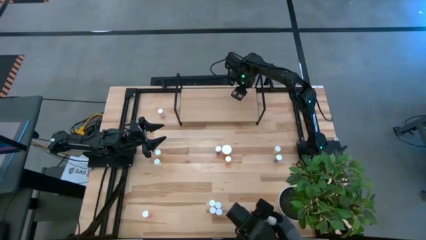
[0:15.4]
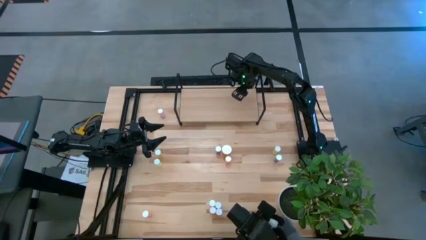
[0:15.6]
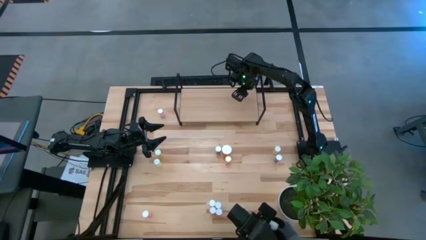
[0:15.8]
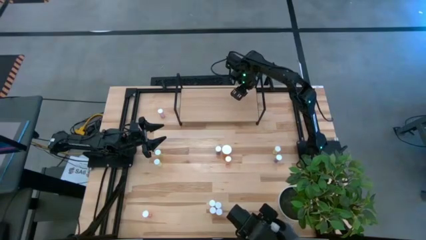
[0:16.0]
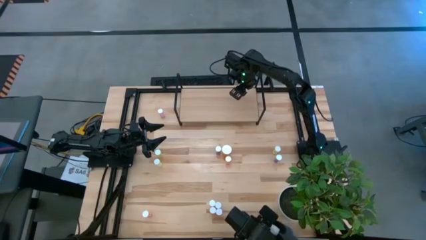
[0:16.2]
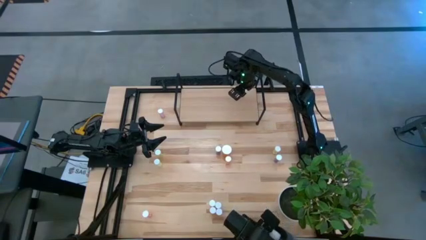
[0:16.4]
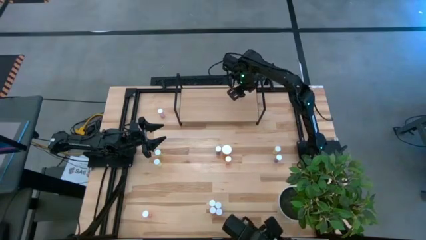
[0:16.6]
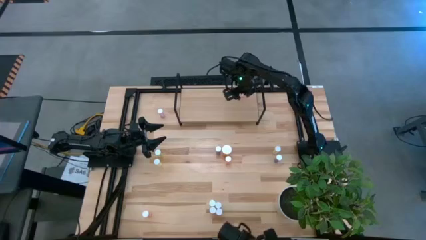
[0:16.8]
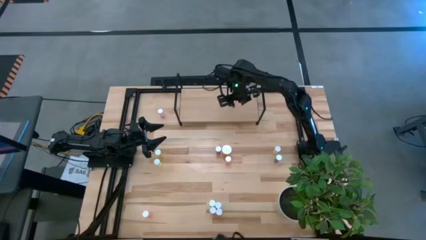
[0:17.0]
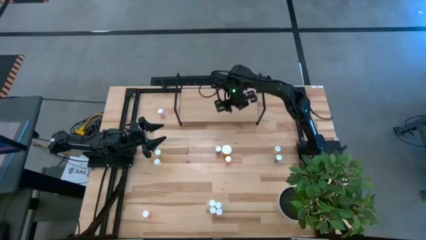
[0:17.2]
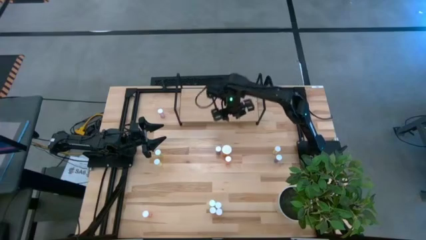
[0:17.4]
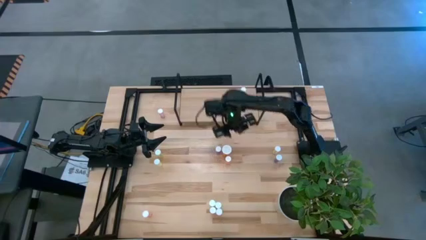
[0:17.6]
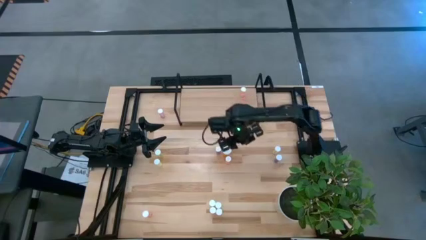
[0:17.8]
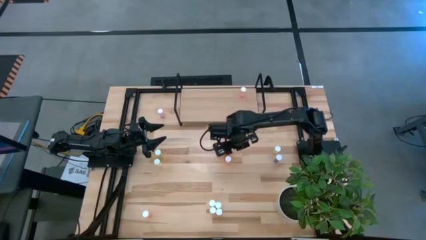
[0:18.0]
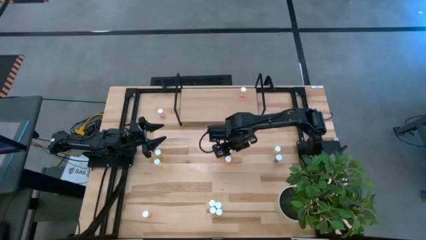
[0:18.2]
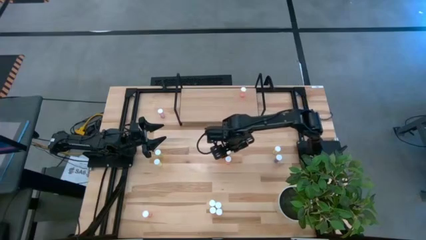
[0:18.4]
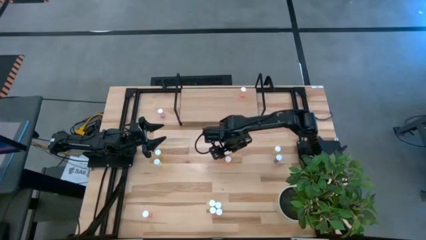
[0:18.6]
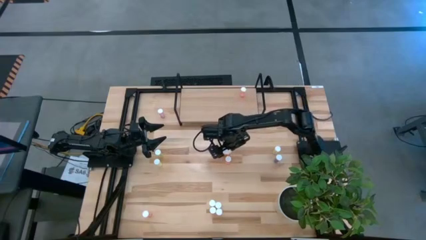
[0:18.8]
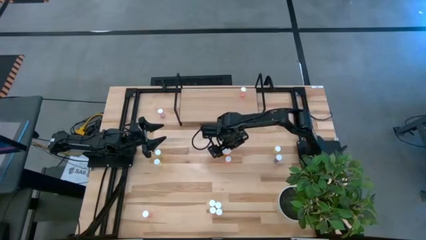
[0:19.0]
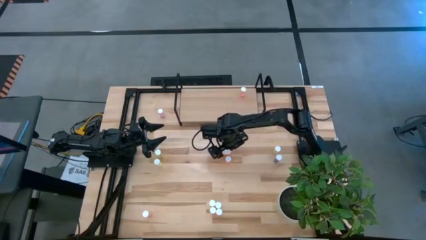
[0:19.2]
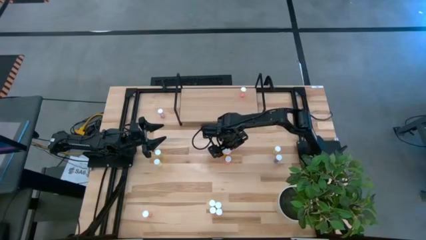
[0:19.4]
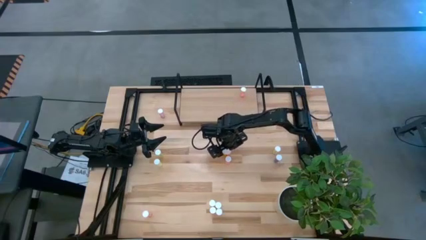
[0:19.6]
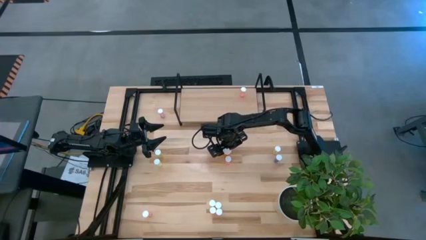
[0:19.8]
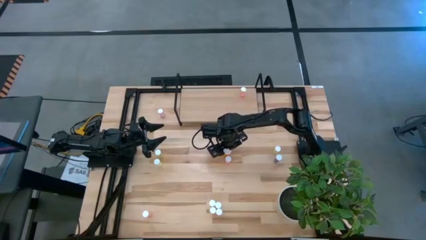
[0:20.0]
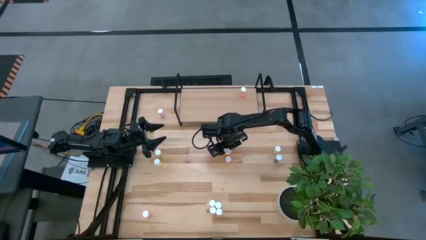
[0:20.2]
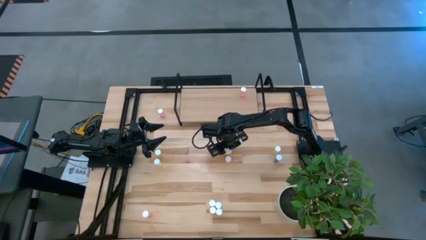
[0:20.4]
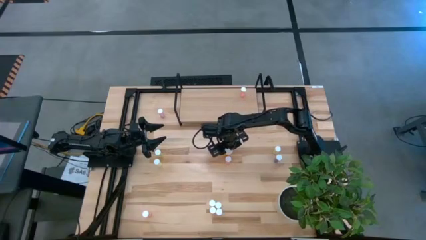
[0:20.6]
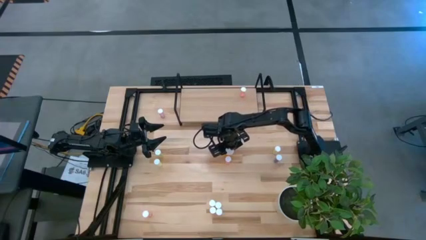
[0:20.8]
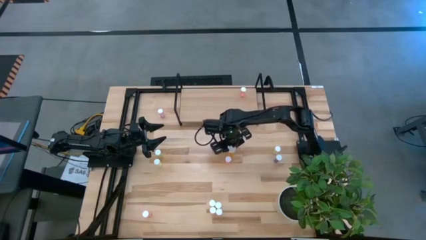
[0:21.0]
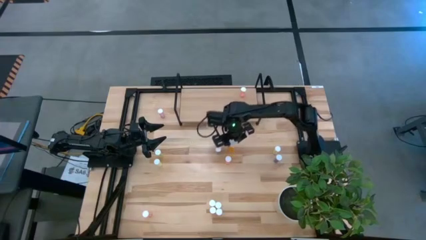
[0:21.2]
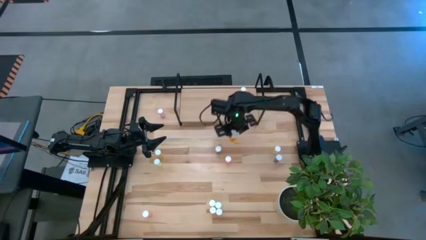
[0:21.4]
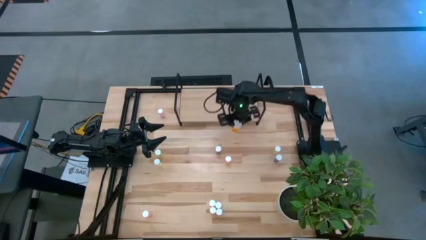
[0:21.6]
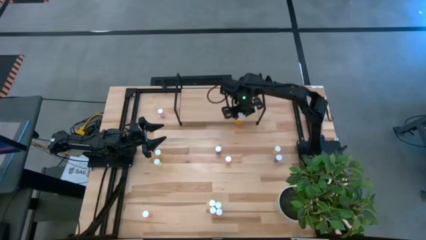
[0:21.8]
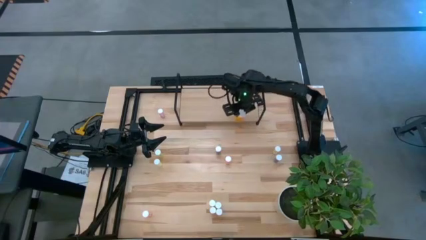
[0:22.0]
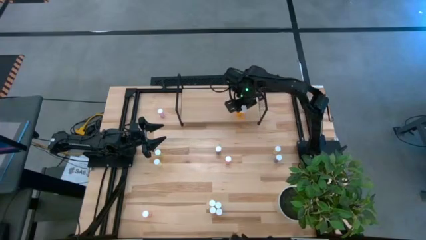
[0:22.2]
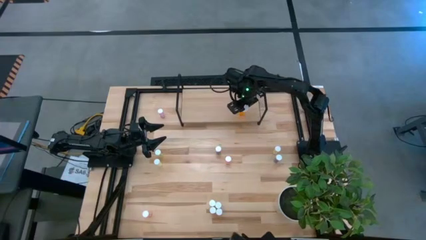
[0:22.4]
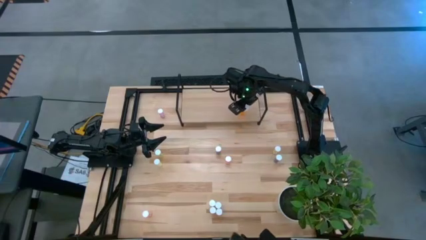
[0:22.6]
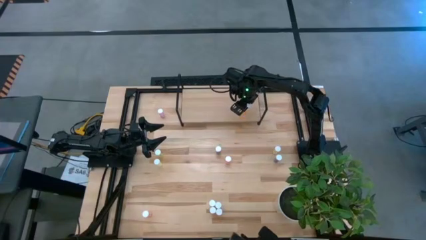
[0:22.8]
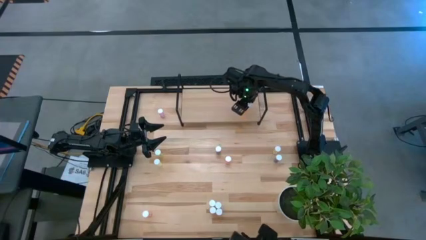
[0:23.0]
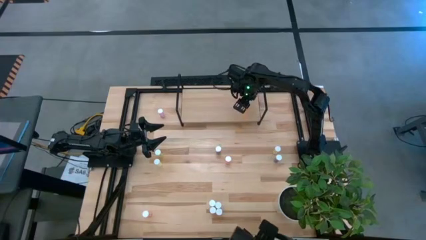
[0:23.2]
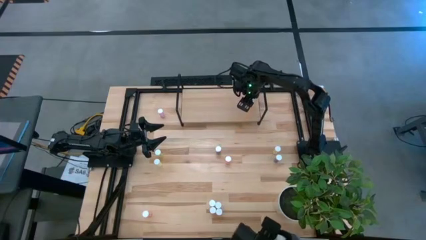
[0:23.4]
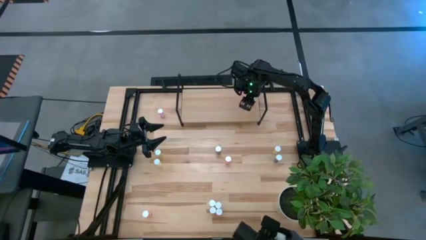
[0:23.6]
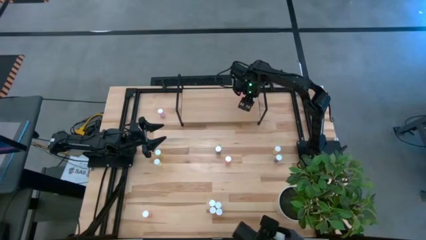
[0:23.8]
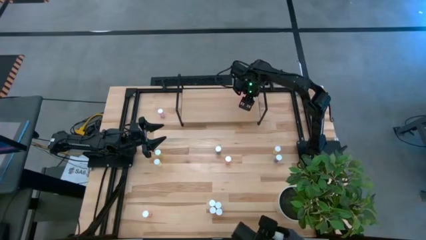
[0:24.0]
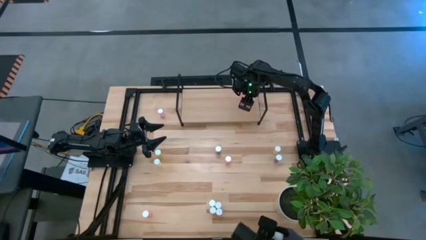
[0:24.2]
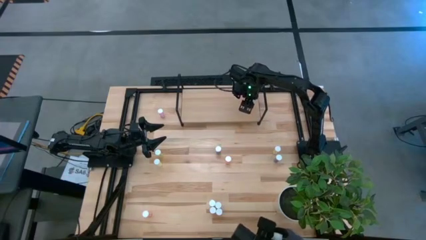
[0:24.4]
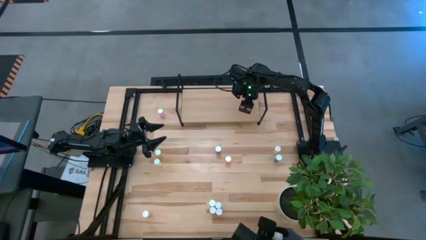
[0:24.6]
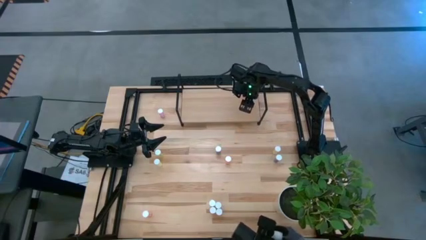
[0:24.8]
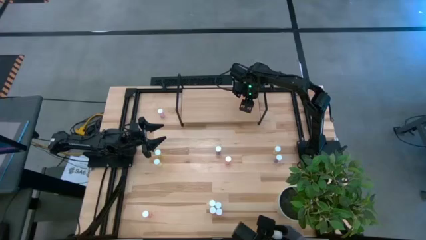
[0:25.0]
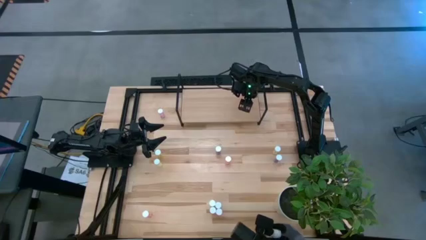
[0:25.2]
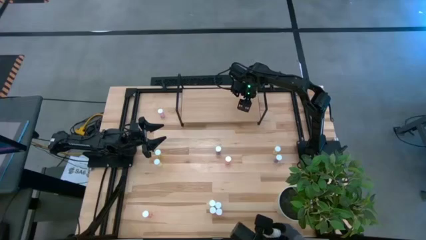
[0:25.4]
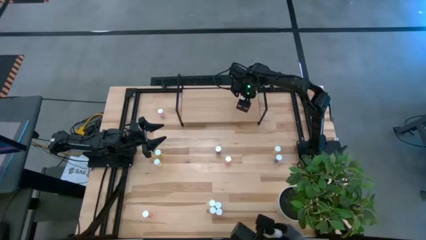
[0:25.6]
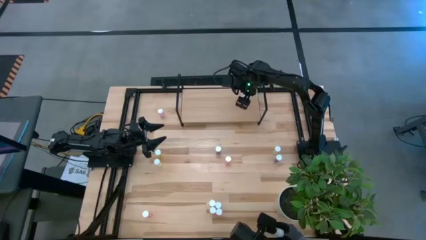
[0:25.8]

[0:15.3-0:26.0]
Task: Pick and place medicine bottles onto shelf by color
Put the large orange pill bottle on the shelf

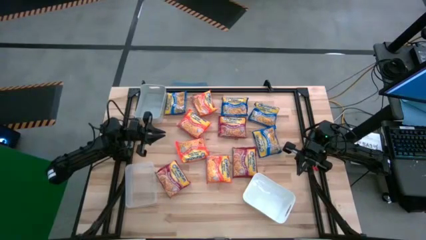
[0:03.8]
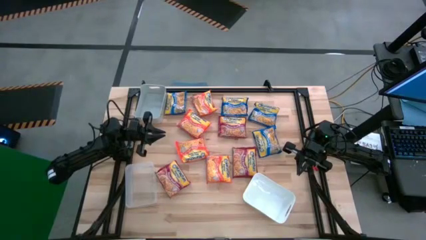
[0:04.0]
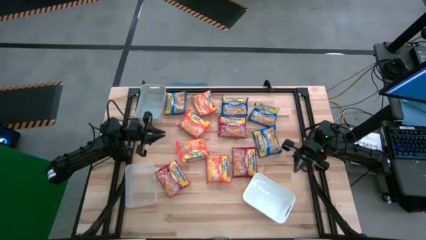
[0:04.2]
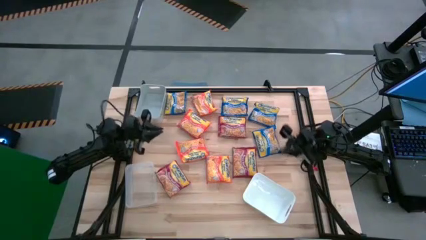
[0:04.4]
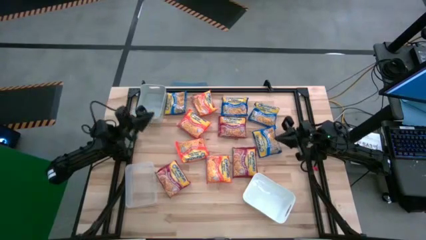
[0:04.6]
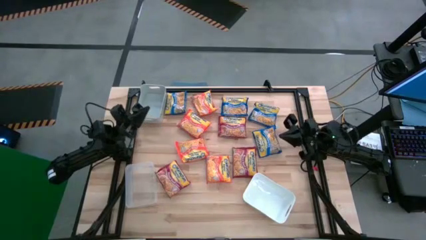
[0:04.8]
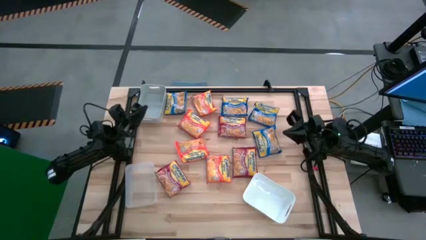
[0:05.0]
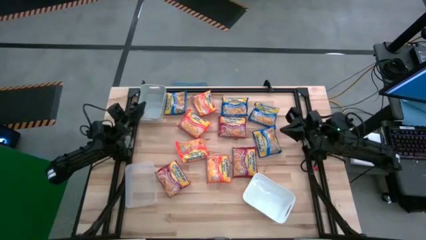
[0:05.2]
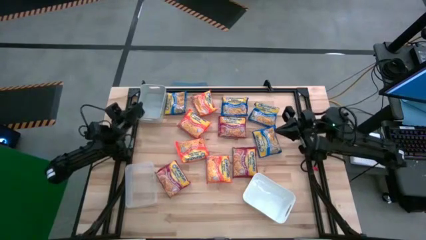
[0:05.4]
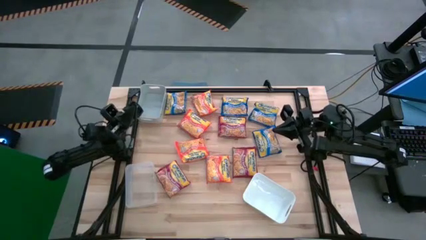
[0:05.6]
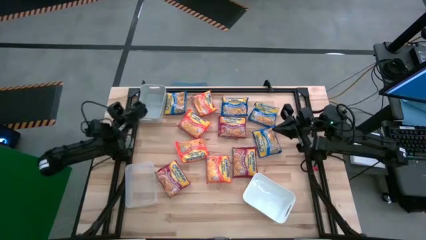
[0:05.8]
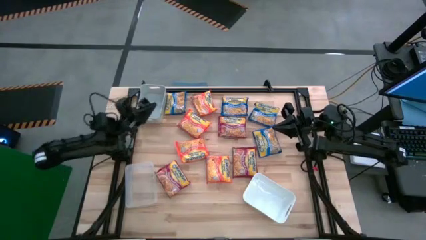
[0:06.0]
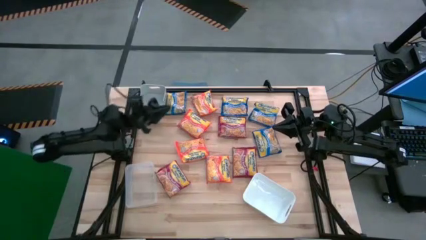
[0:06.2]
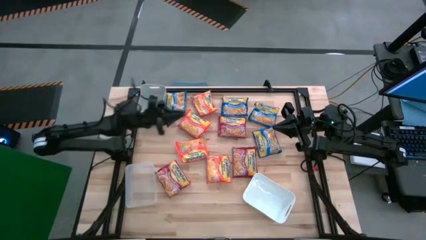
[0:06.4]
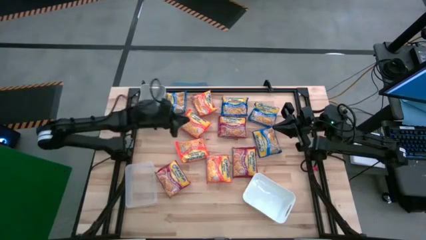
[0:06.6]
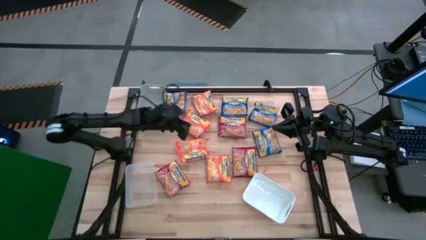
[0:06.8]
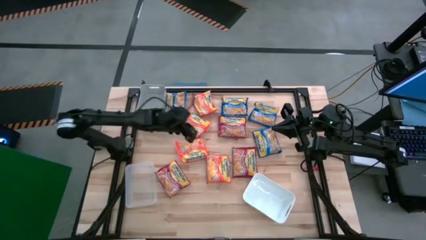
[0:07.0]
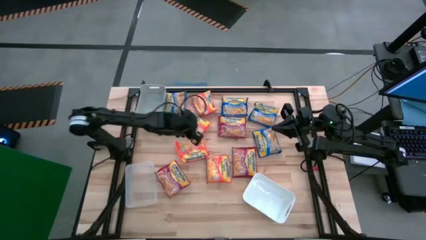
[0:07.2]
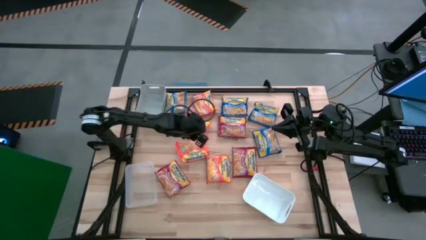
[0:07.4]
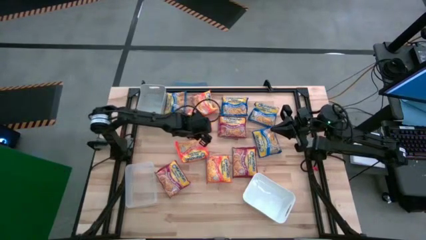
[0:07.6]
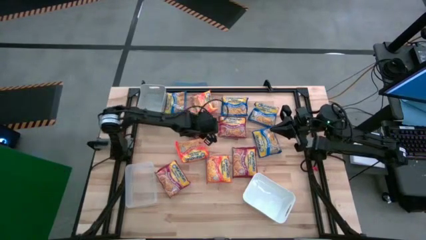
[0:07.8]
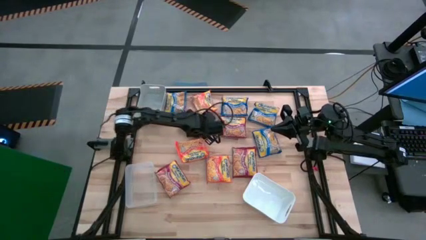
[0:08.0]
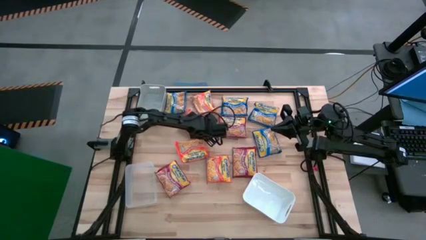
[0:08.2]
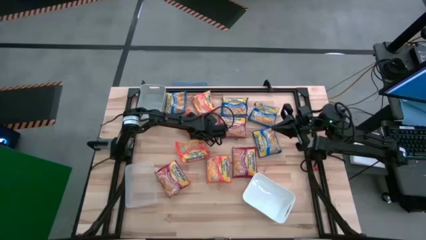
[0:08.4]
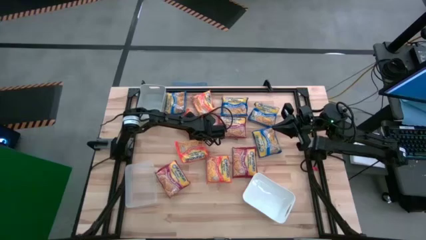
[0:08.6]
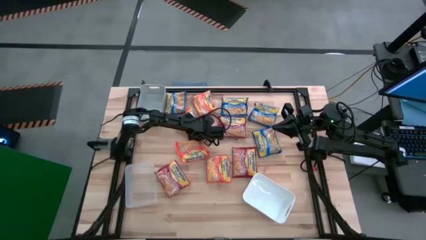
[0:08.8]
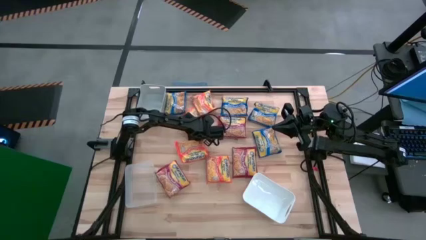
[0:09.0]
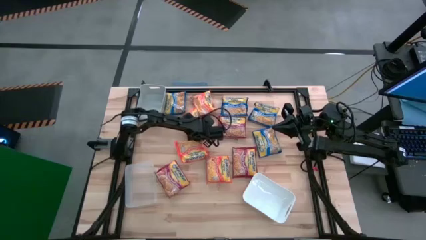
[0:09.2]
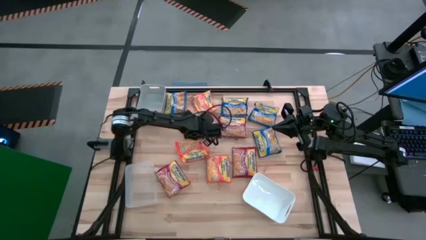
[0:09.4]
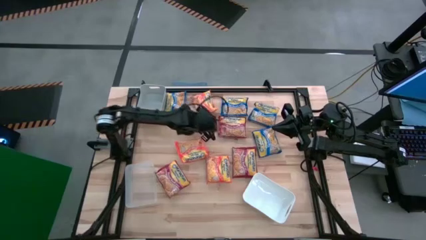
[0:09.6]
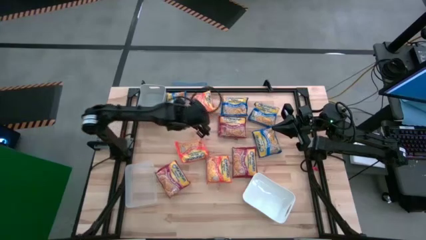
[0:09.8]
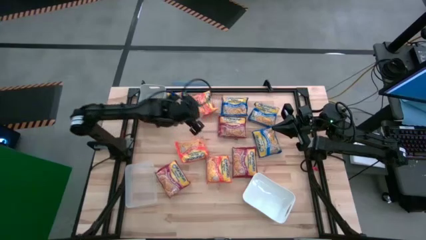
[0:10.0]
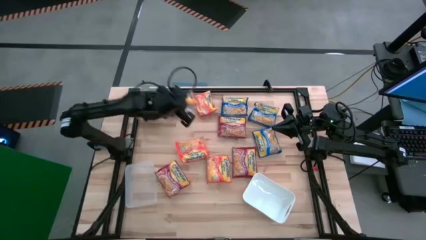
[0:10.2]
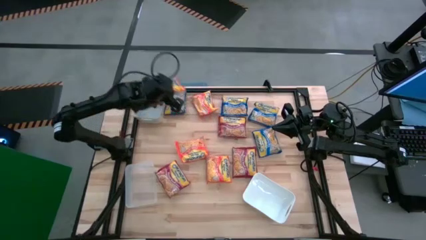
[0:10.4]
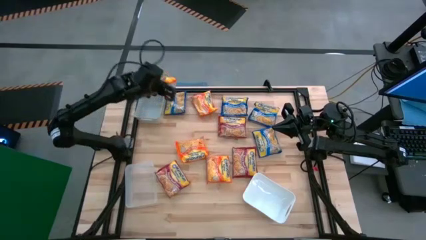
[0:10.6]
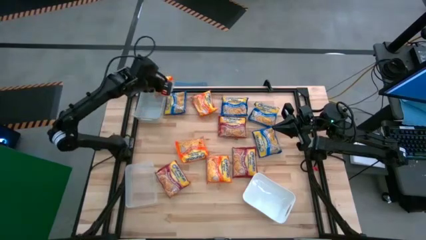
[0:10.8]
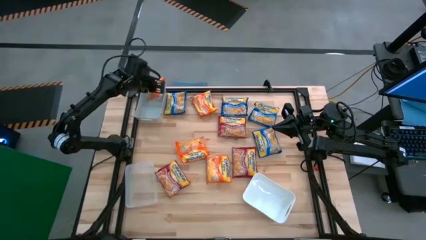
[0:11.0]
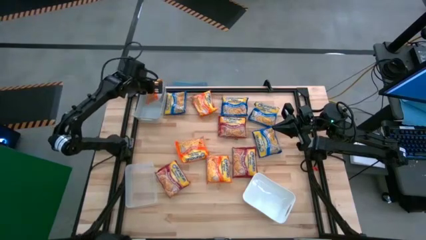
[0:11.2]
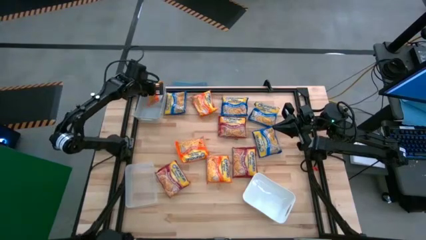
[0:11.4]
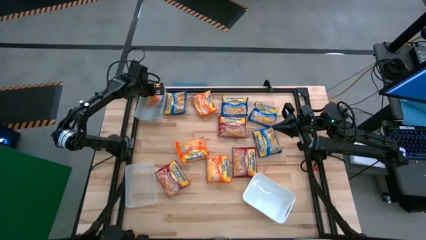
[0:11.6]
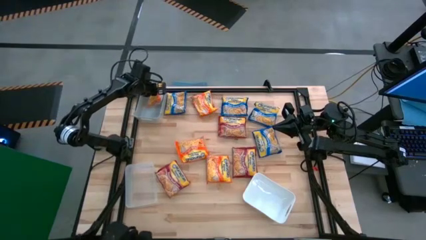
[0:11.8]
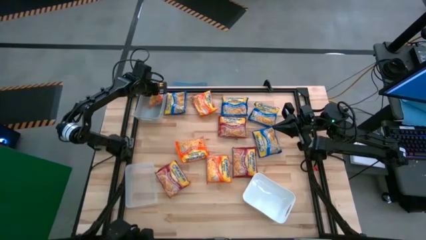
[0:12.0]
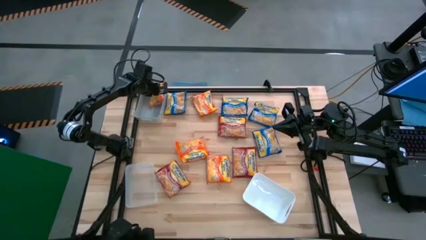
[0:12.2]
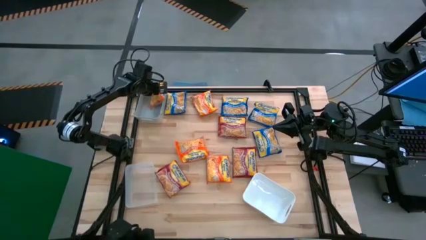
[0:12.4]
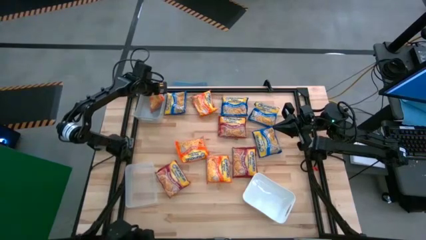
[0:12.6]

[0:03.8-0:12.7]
Task: Sort Maruchan noodles
Put the orange noodle pack into the gray bin
